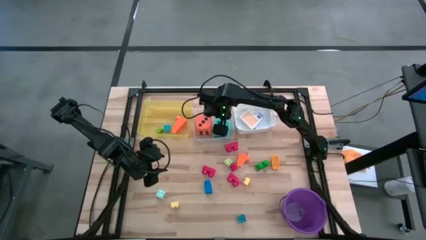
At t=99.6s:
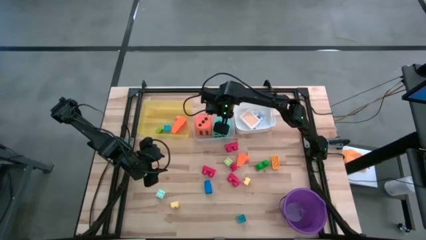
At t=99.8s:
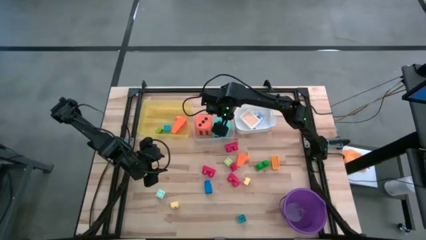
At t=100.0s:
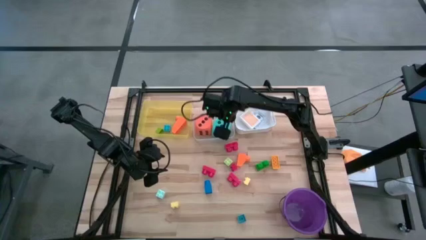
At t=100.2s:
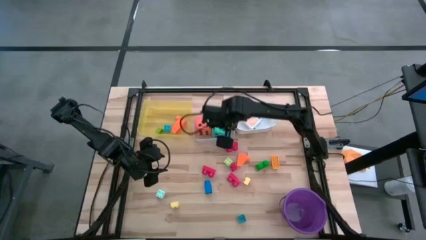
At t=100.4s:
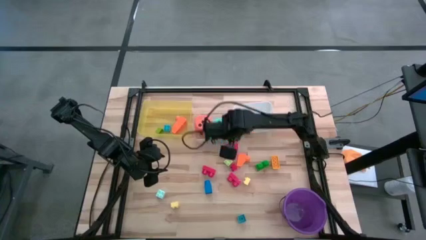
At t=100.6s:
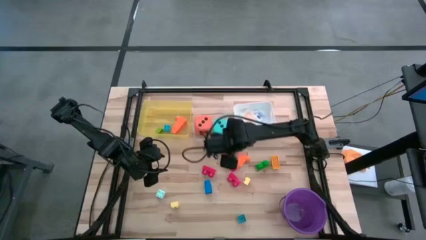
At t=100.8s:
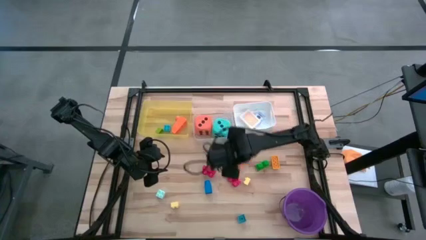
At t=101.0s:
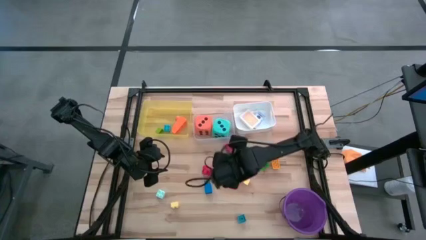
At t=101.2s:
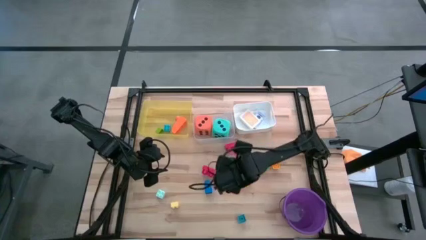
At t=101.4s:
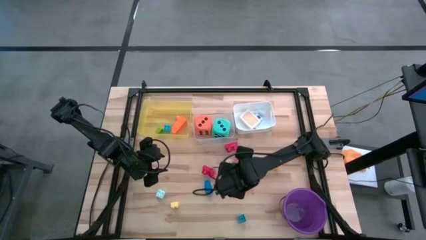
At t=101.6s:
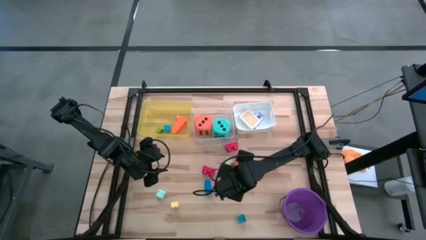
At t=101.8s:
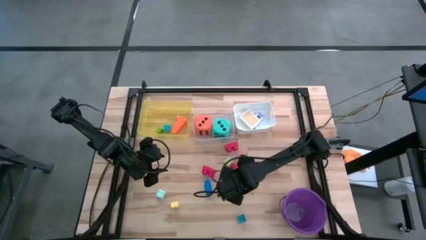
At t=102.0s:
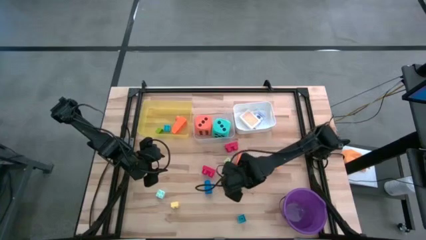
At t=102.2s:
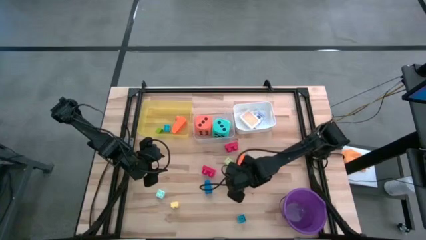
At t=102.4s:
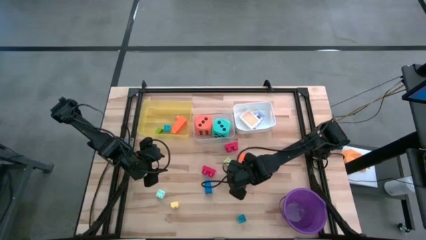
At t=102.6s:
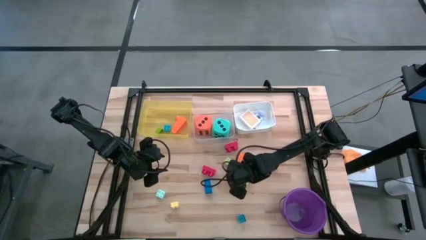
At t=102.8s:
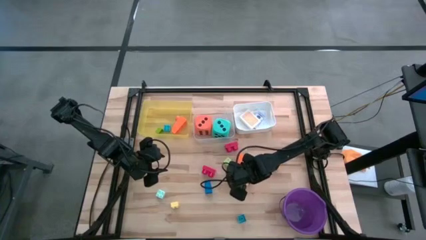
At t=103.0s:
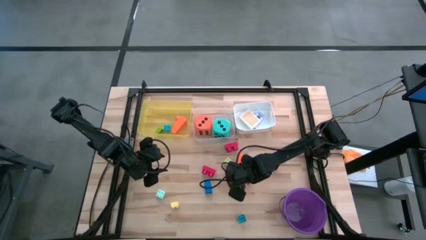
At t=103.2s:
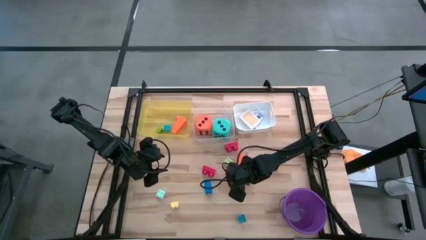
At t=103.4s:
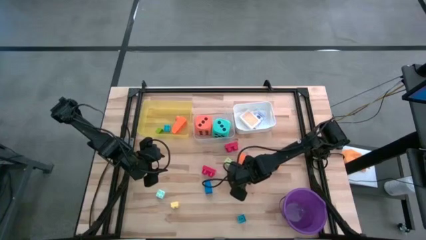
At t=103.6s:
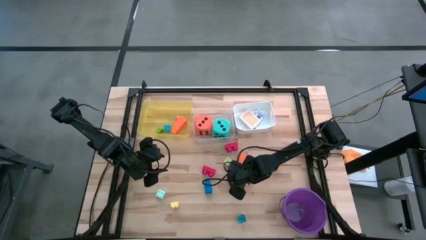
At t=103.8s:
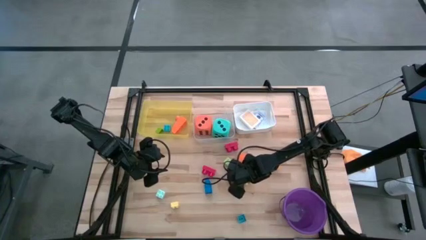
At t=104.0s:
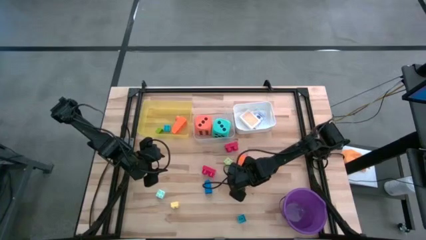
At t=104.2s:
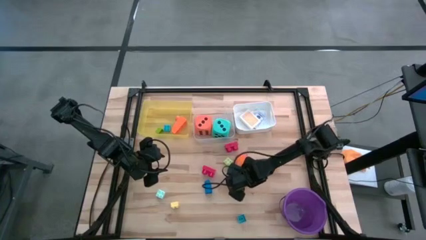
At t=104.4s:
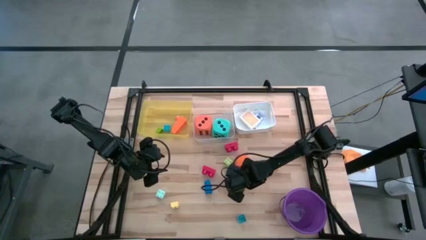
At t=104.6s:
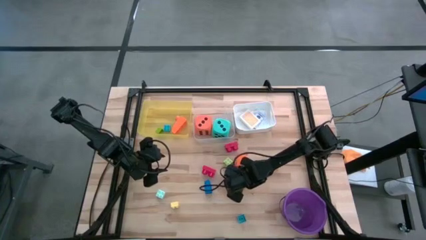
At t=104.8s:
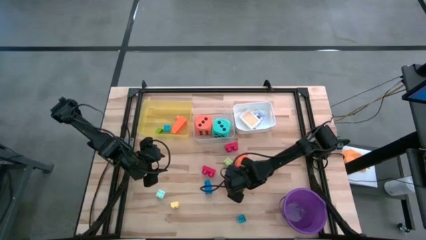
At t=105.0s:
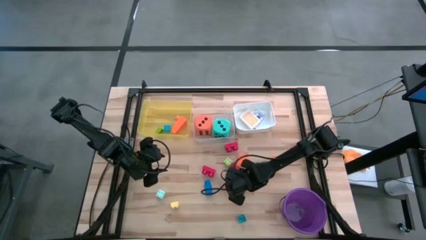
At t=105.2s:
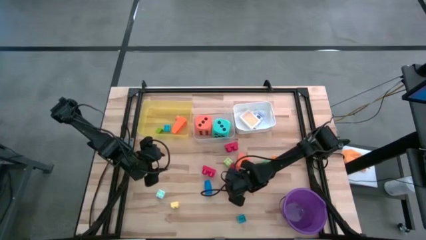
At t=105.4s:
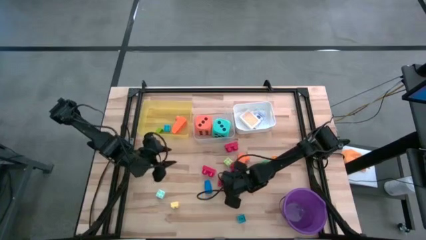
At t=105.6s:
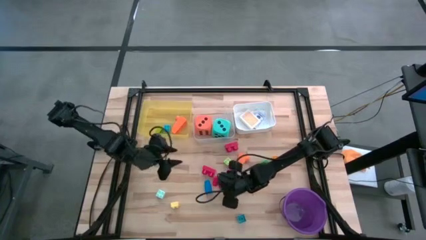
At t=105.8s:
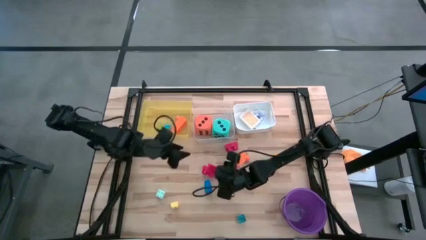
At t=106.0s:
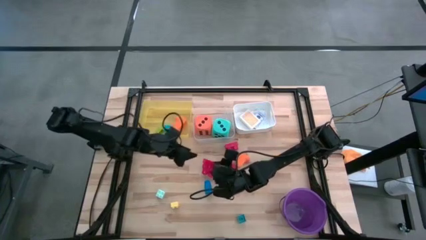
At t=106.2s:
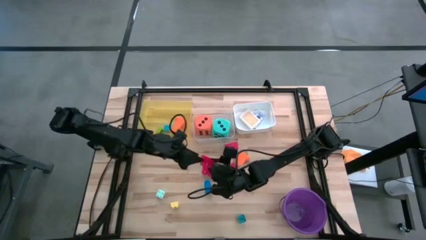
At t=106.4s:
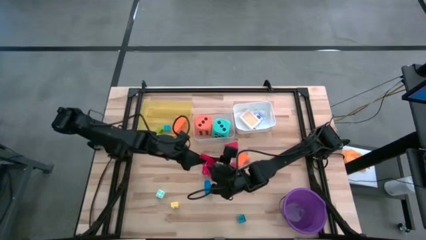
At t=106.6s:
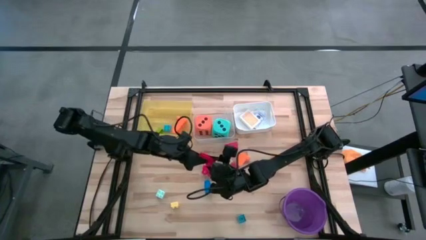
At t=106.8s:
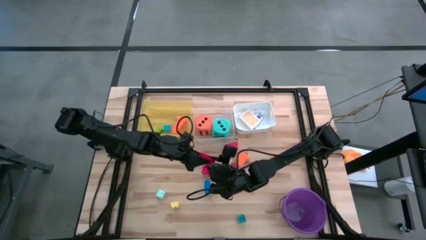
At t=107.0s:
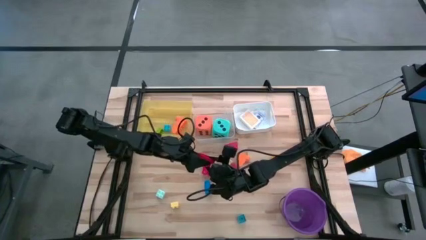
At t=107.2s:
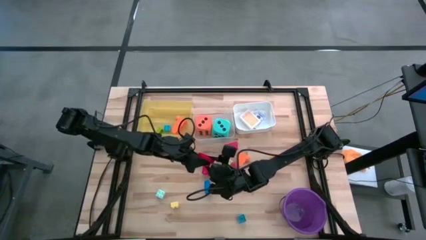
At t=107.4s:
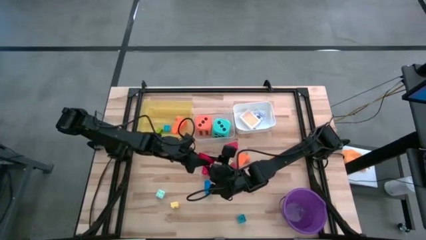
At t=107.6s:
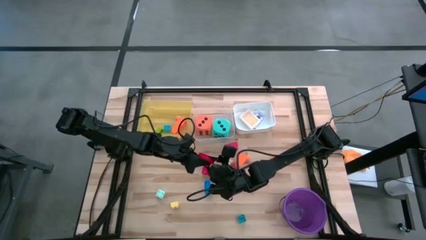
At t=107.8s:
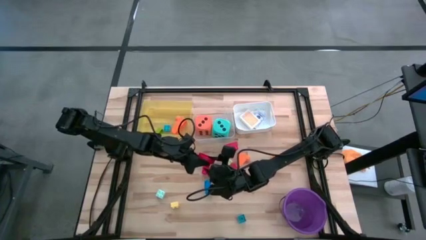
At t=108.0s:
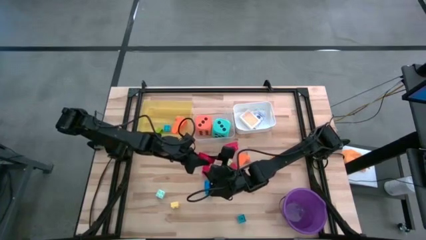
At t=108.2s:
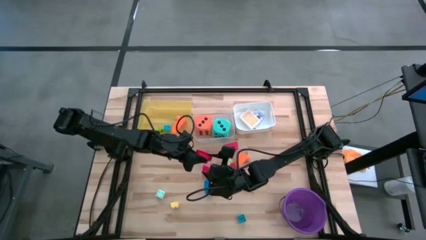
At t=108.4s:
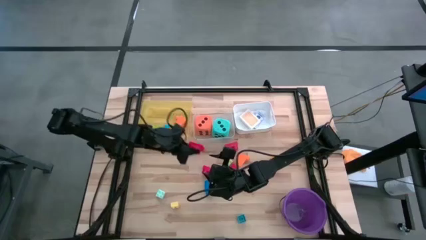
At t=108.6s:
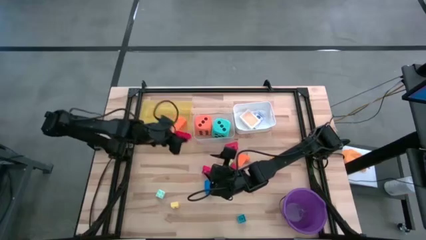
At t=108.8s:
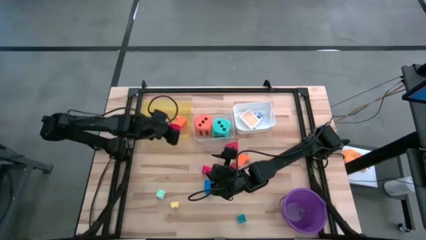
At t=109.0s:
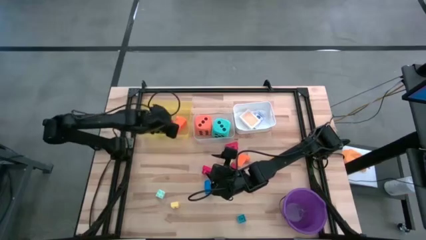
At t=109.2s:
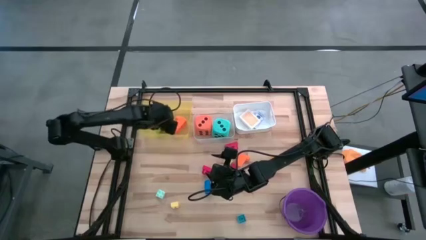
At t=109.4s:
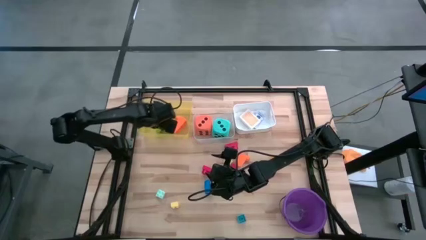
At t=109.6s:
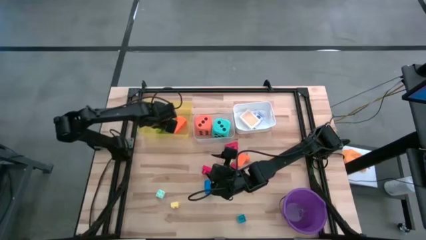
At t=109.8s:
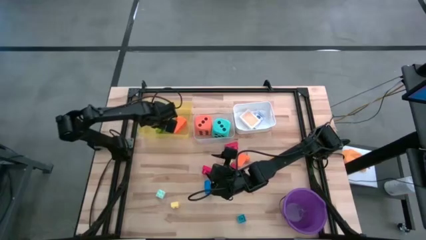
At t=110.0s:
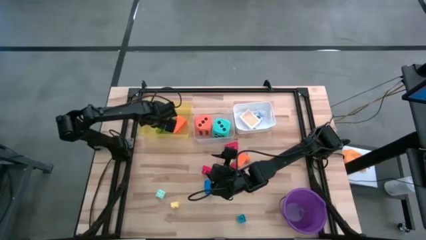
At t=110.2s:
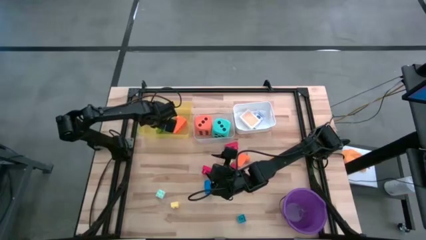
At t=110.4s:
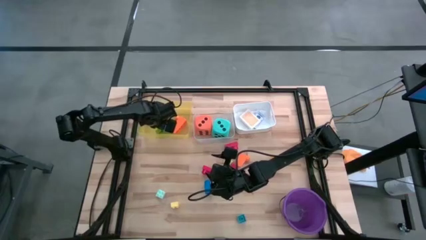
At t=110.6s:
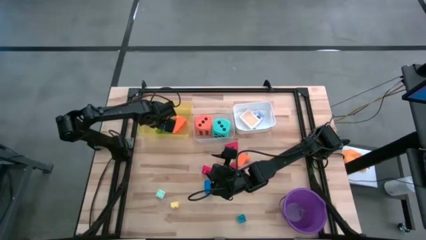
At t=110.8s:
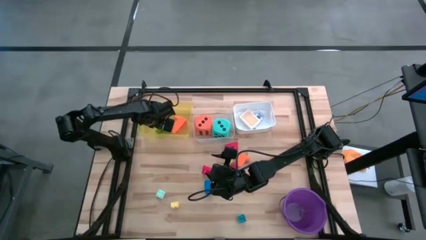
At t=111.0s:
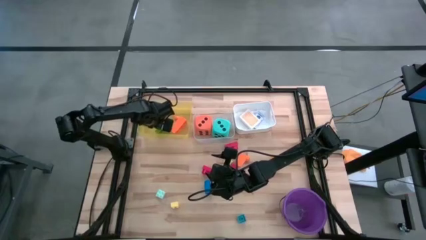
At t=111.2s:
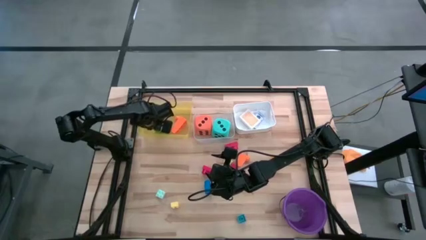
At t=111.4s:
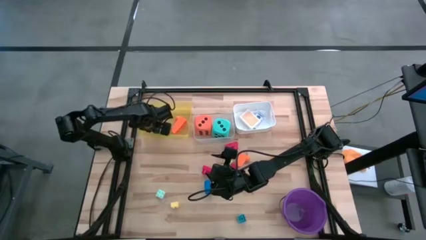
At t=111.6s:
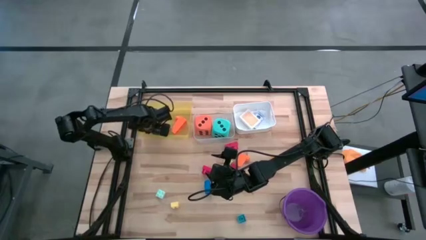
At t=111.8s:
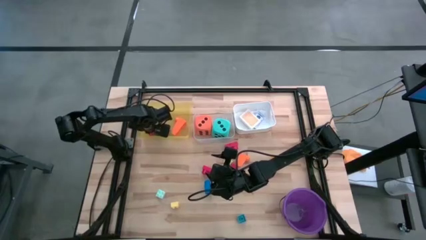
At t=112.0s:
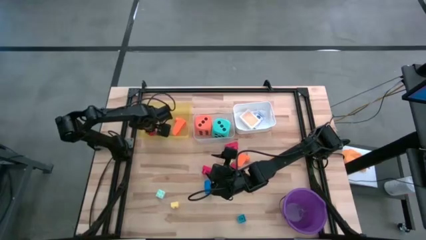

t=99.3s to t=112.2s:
Task: Pick & Place Toys
Put the red game piece into the yellow bin

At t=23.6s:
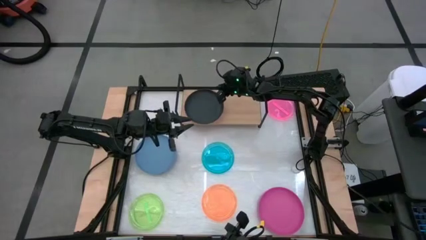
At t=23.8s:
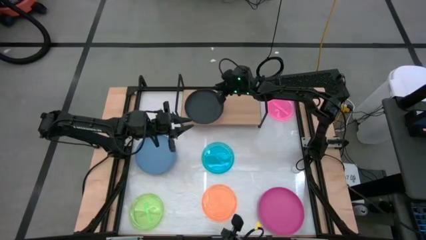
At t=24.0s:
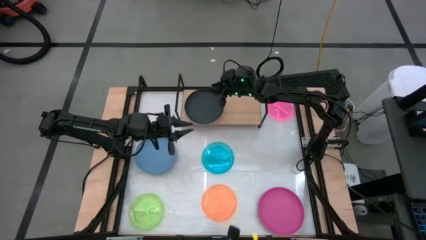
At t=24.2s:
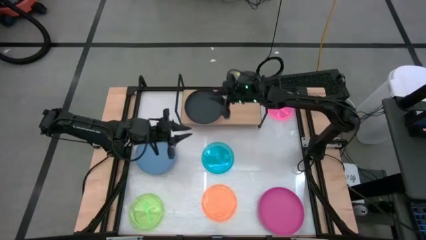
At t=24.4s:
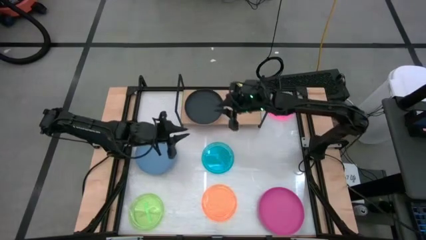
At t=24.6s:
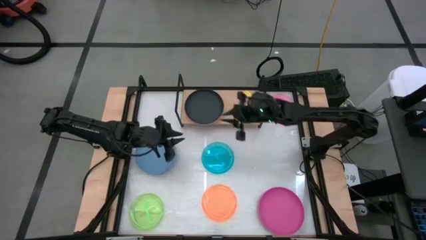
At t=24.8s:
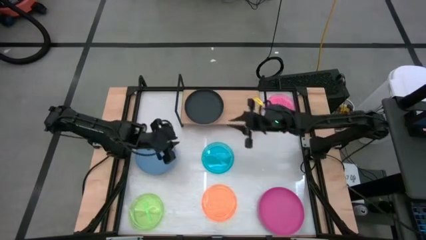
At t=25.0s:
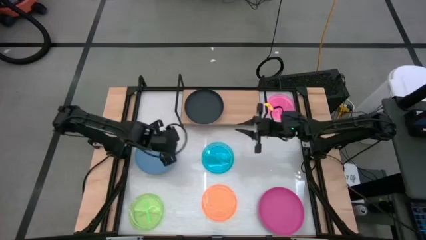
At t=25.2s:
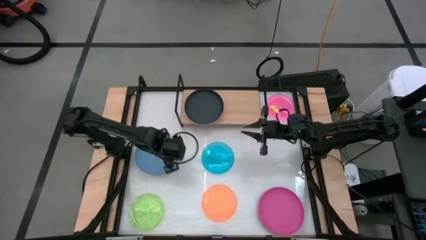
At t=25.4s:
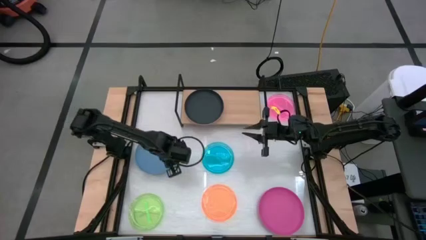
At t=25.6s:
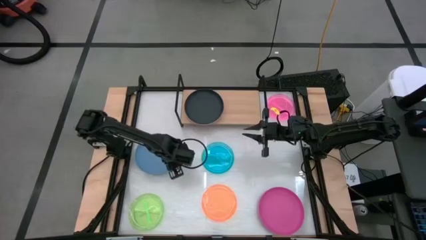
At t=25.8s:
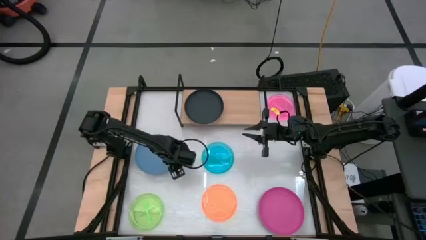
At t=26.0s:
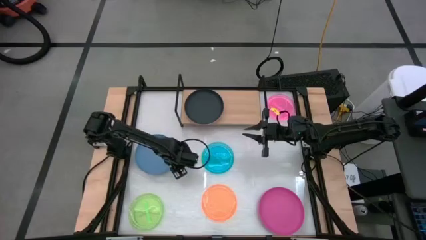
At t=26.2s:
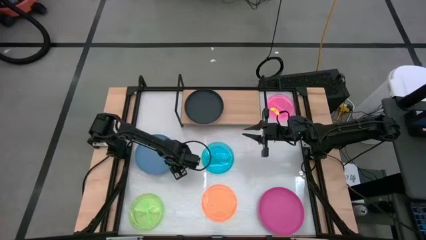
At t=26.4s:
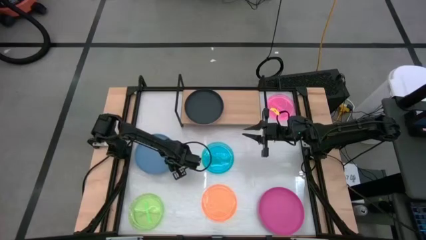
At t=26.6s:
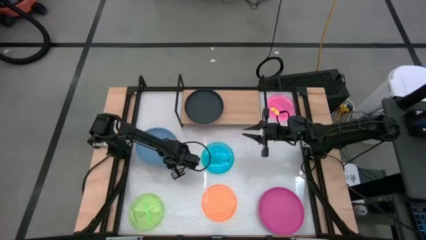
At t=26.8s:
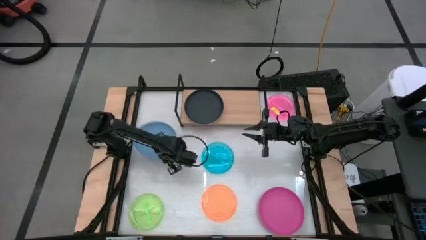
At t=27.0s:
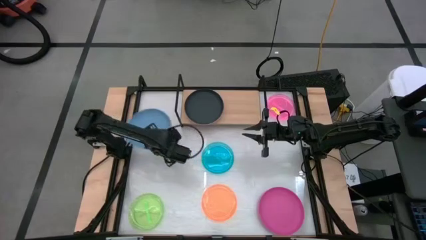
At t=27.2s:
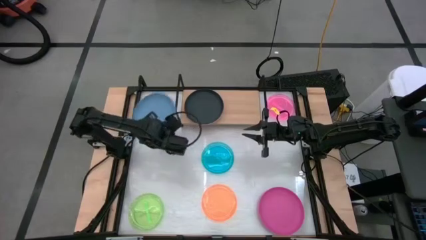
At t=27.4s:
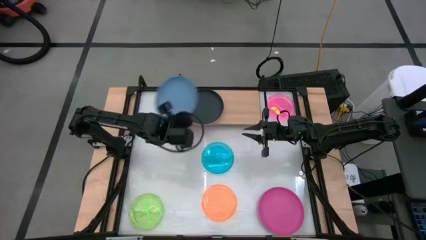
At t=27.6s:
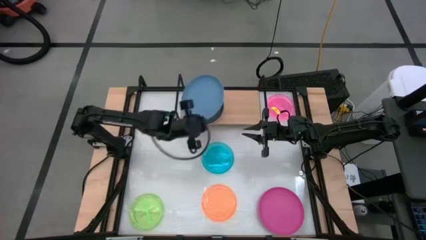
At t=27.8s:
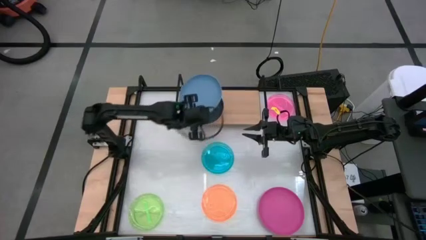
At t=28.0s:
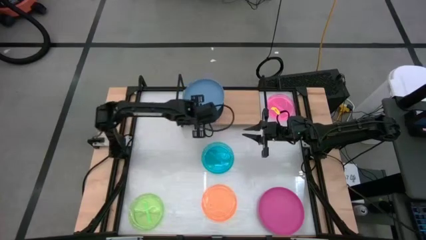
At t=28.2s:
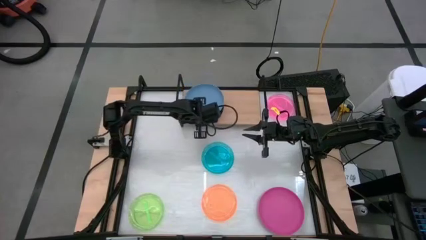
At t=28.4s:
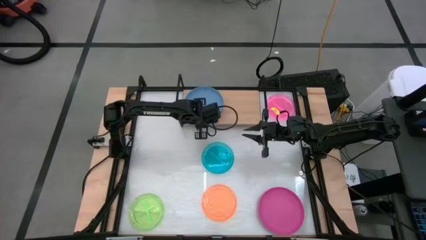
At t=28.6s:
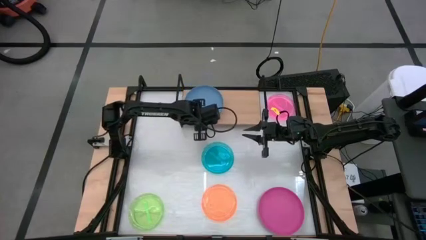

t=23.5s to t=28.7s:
Task: Place and stack plates onto a shelf
Stack the blue plate on top of the black plate on the shelf
